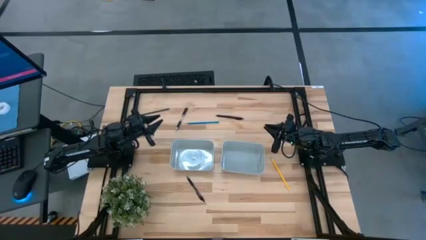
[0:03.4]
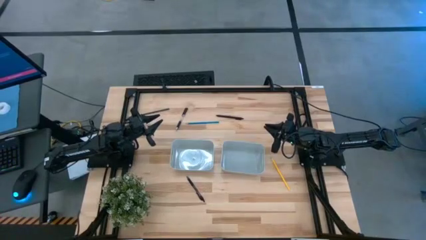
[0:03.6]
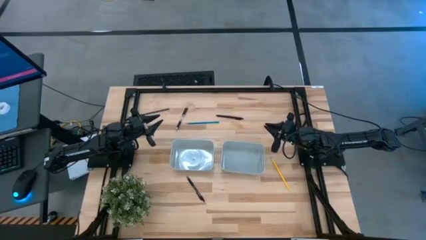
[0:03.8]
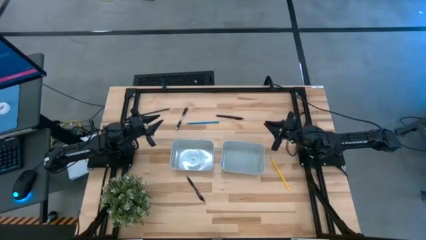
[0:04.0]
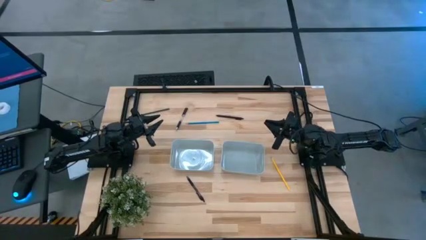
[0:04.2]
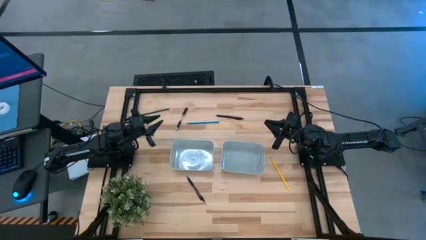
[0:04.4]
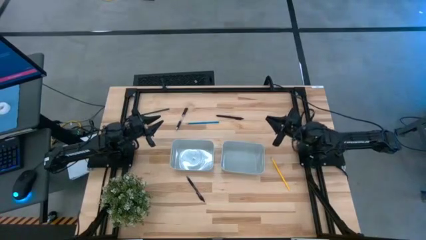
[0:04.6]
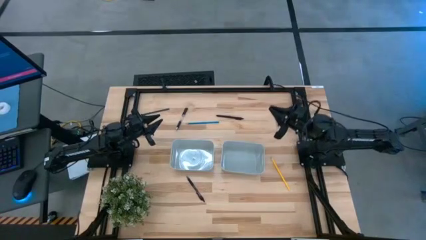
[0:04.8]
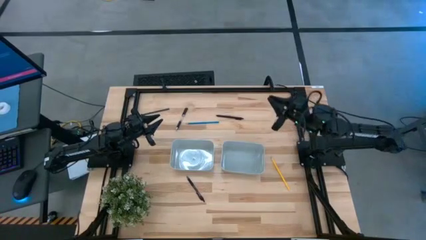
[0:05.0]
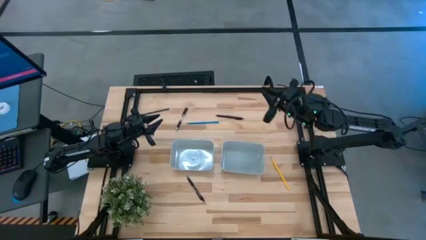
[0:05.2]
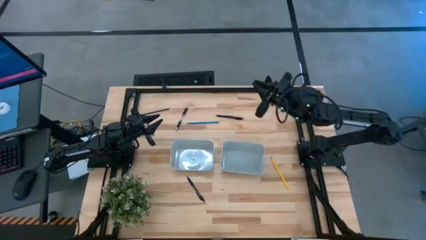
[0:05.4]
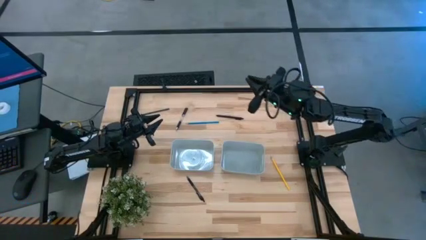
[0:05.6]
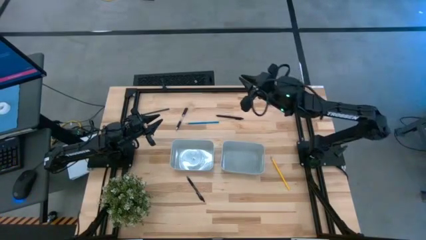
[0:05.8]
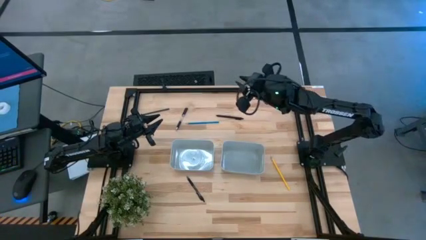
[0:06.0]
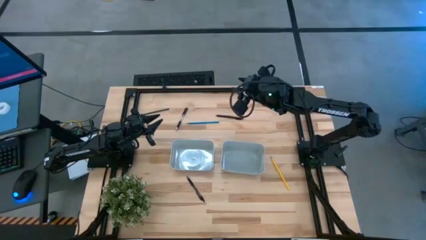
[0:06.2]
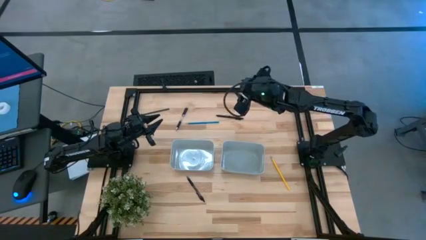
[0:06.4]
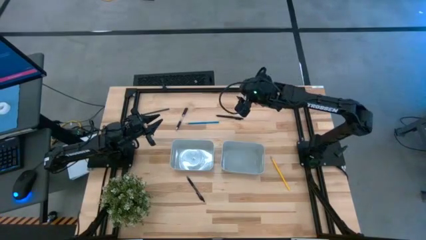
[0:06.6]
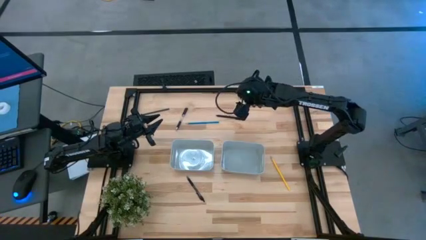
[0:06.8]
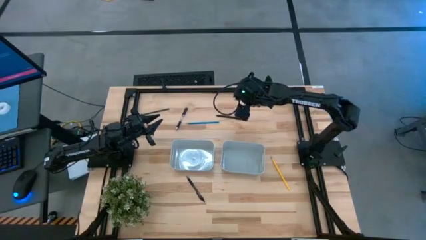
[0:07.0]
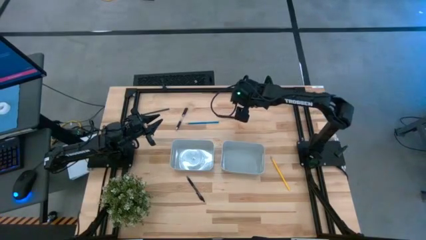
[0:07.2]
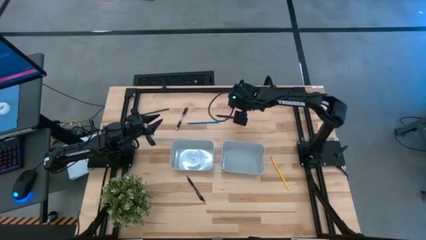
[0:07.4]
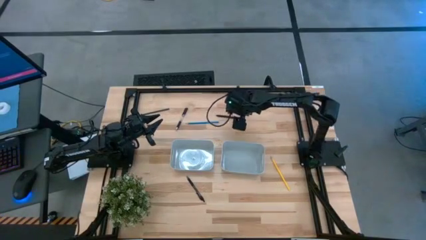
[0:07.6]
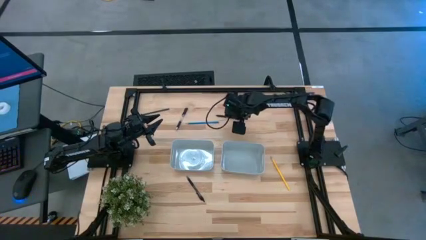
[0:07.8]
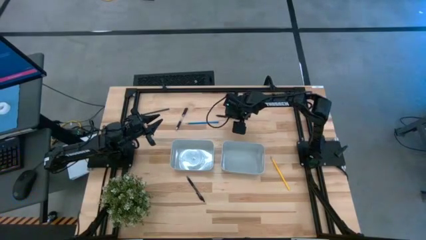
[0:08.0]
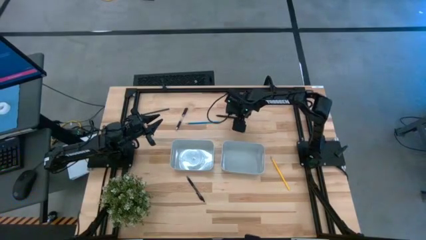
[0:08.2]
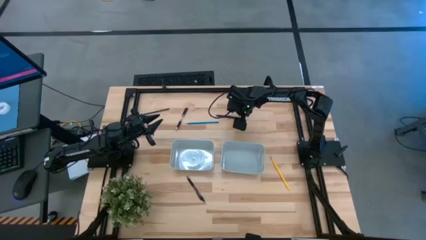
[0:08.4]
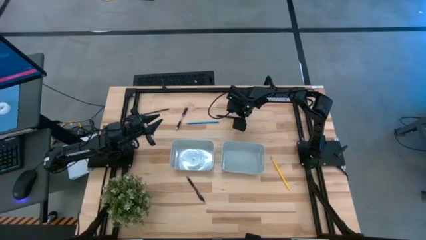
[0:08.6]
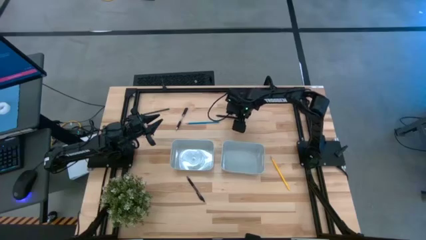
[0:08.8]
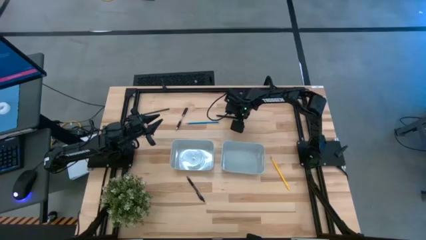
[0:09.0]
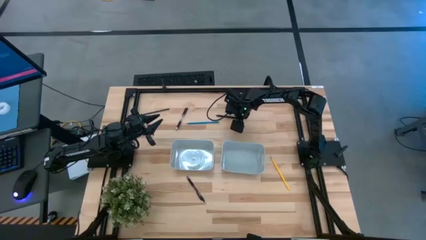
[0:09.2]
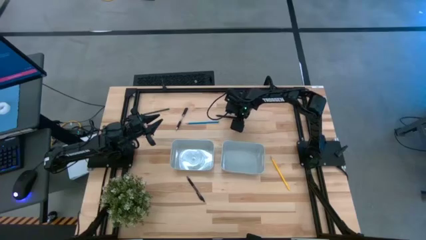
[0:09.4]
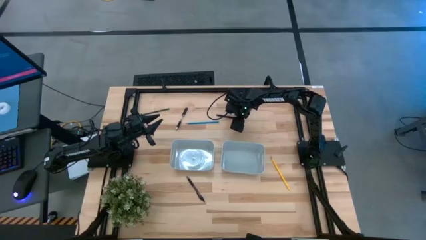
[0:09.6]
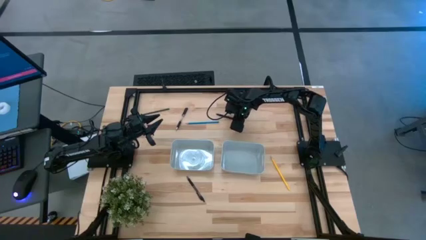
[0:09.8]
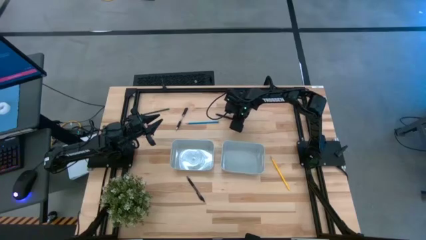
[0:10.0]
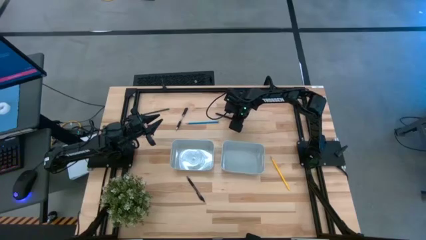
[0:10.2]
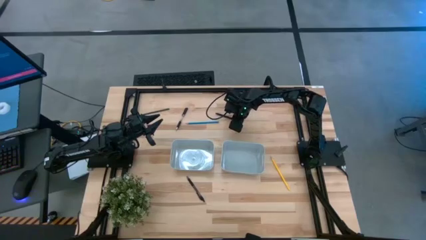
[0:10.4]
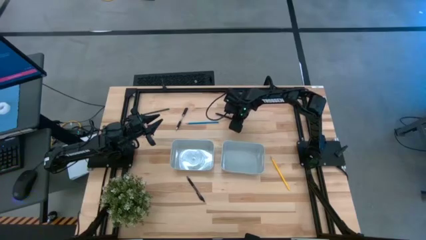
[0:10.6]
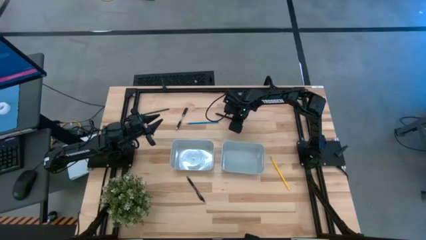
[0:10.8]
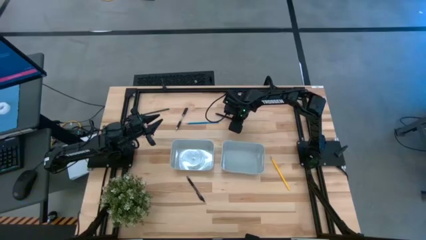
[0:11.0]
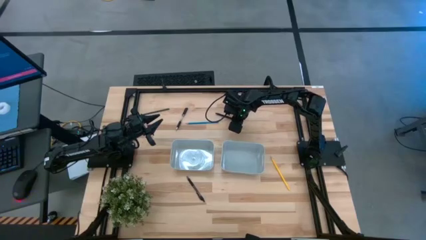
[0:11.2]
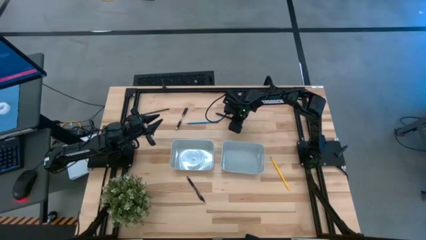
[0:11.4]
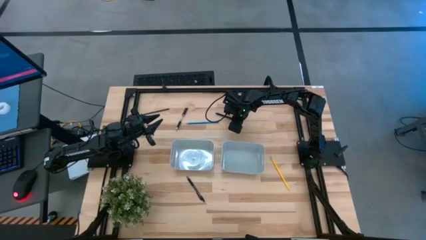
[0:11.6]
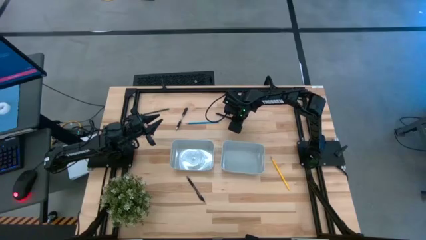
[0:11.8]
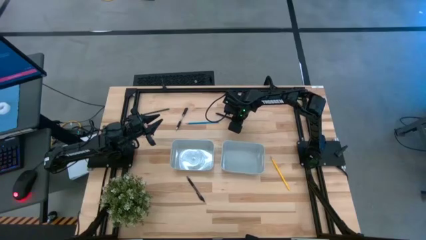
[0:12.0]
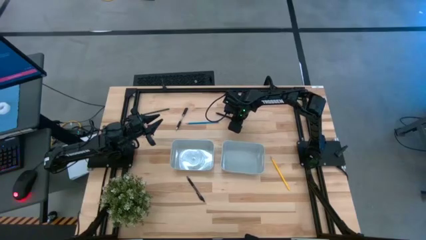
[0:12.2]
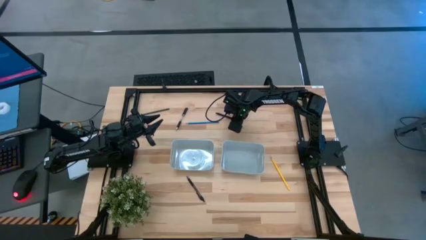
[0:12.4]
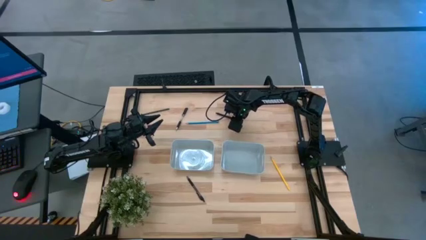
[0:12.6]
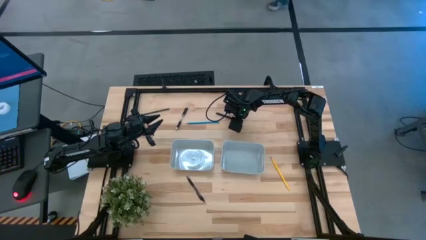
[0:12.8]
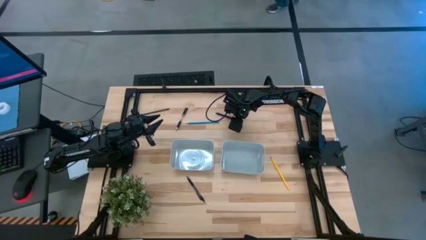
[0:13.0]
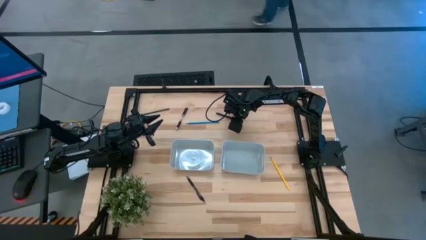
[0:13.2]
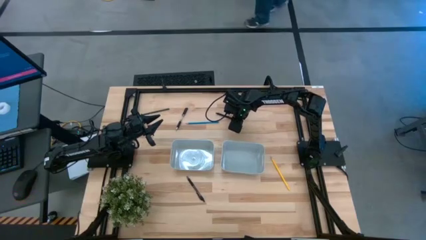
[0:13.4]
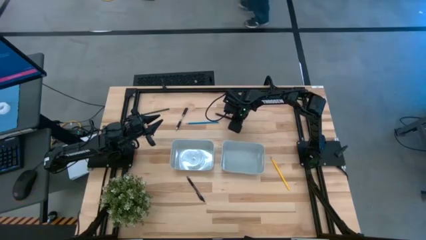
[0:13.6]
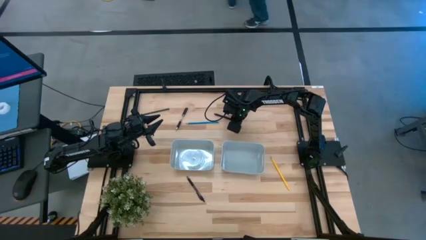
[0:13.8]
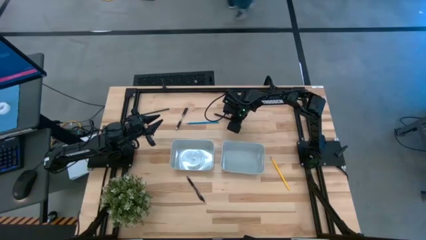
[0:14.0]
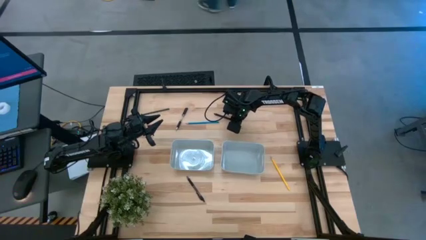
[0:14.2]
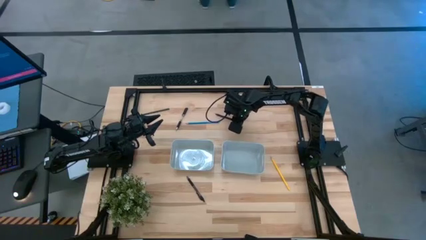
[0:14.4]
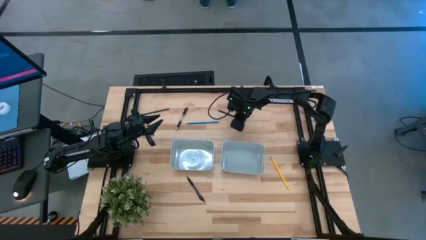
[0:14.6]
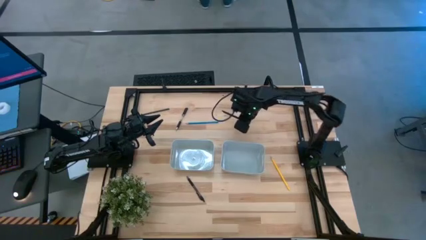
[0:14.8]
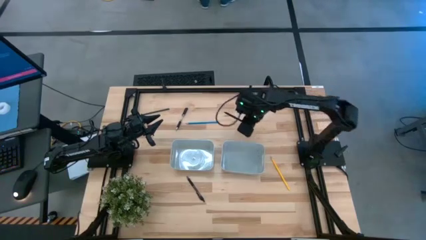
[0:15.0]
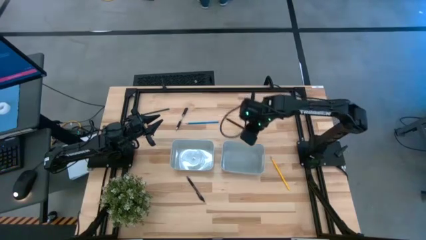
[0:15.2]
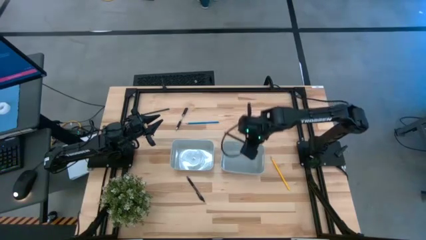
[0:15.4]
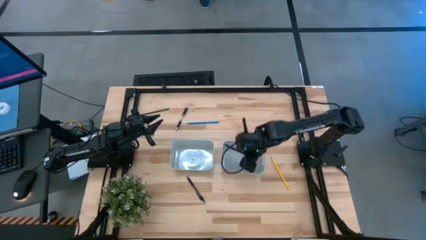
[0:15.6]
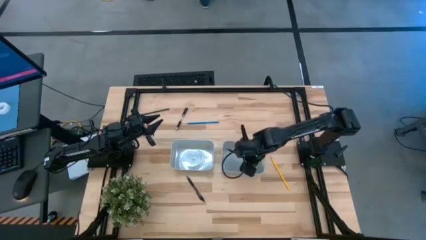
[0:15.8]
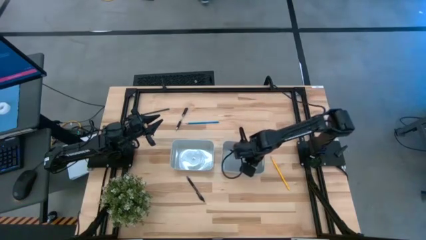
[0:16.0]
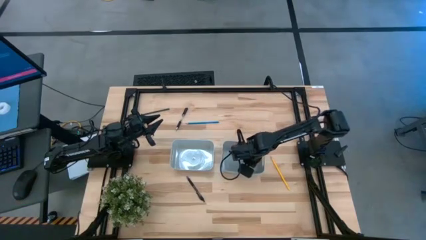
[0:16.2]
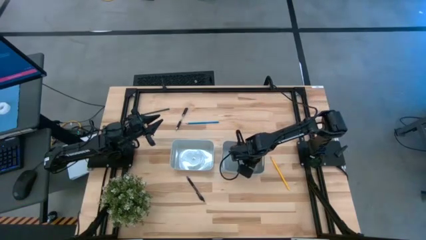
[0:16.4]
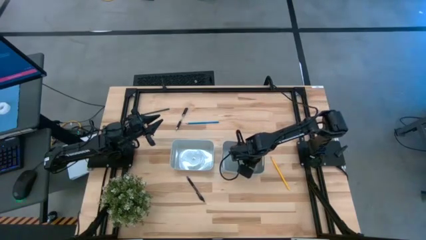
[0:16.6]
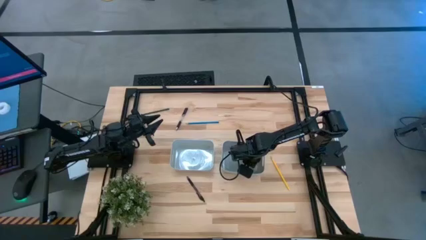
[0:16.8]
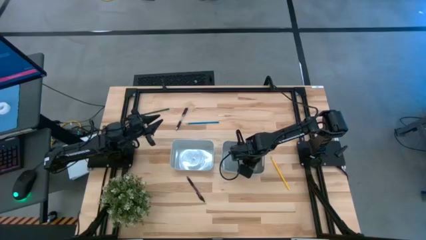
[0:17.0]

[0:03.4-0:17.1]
Task: Sort pens & pencils
Put the top right black pen into the right gray bin
